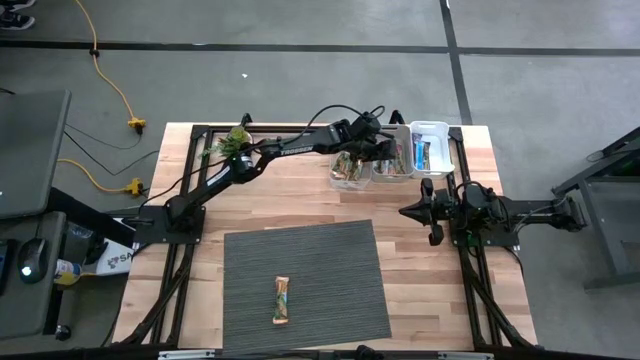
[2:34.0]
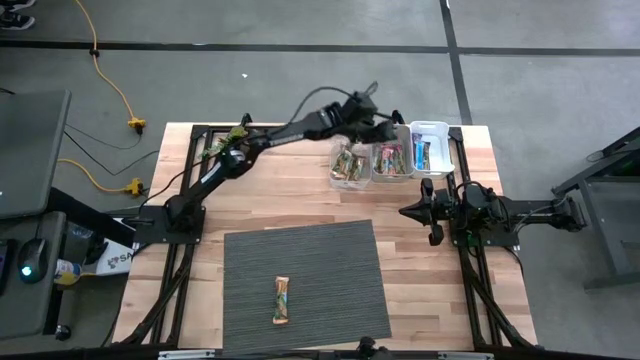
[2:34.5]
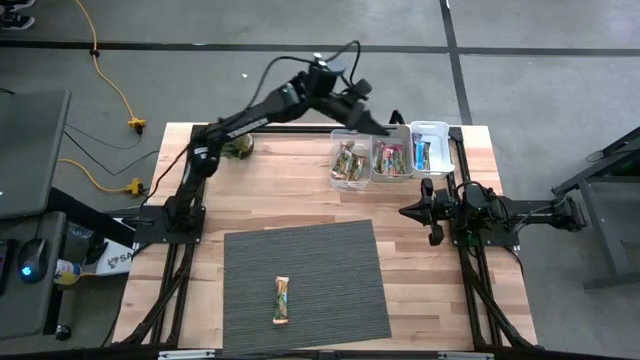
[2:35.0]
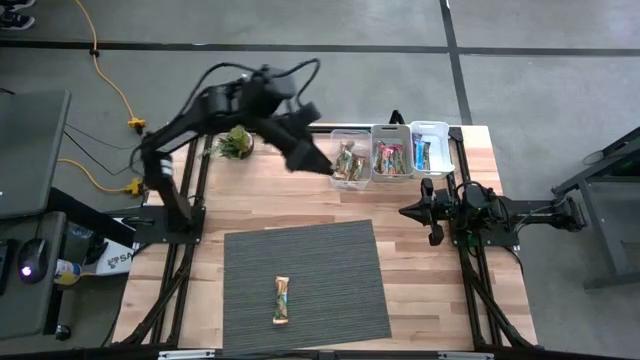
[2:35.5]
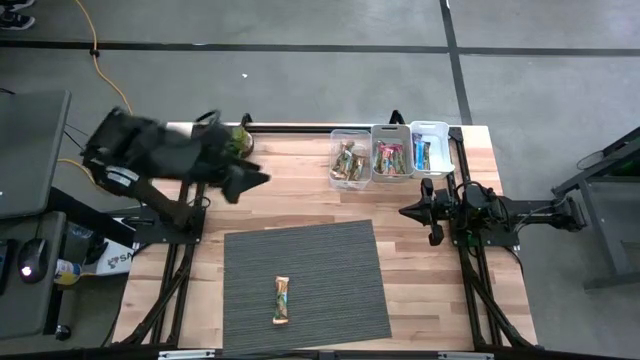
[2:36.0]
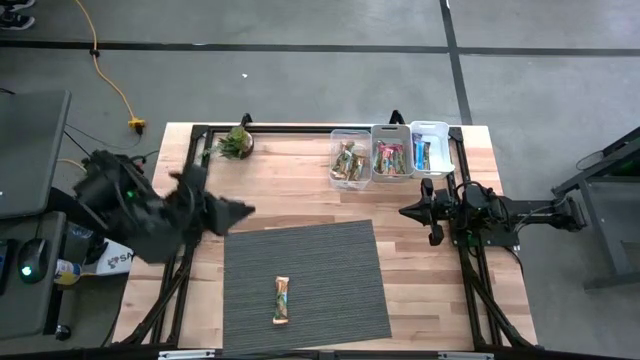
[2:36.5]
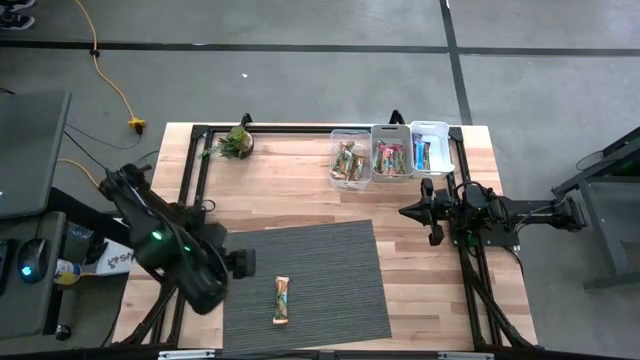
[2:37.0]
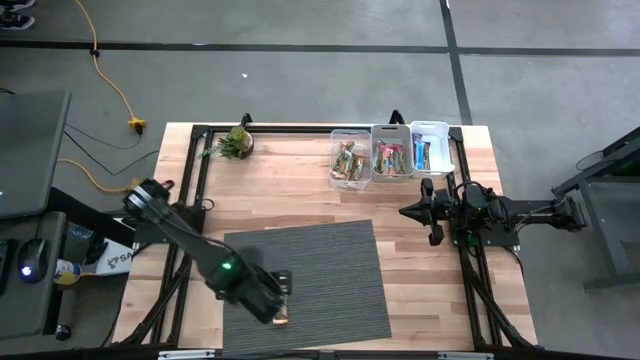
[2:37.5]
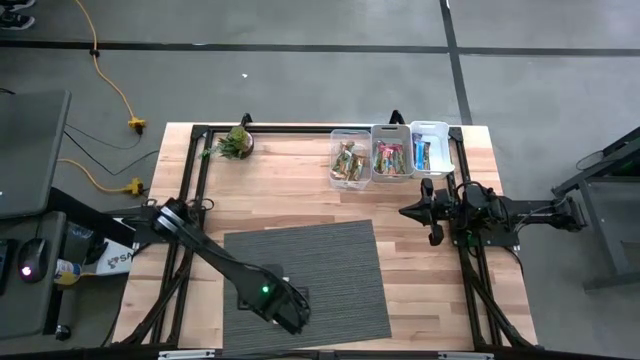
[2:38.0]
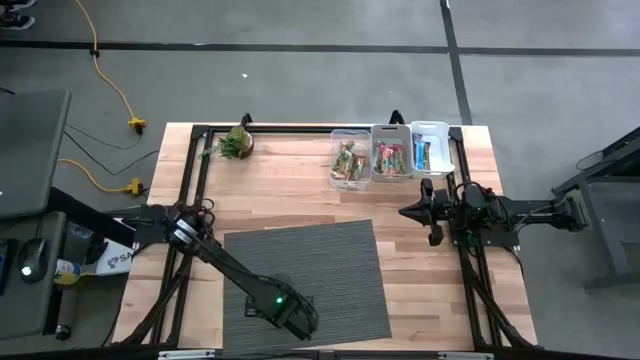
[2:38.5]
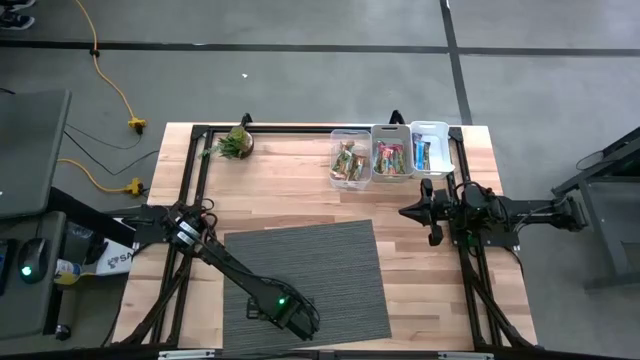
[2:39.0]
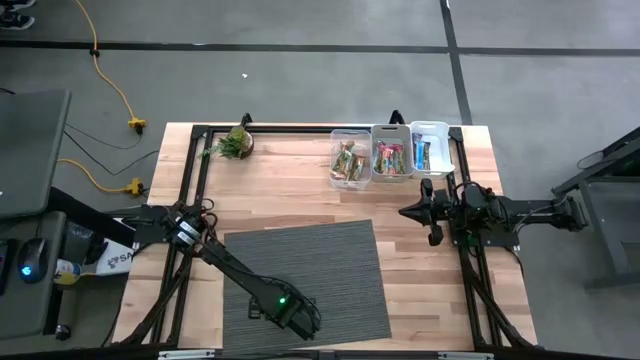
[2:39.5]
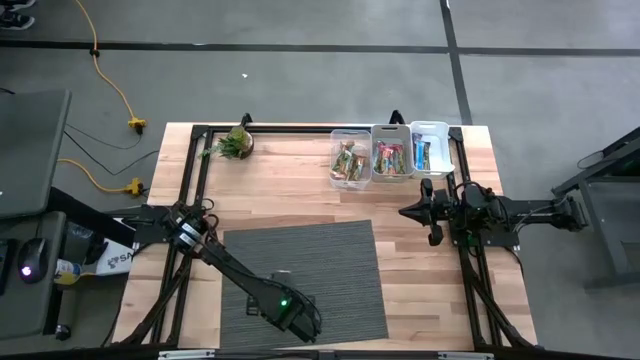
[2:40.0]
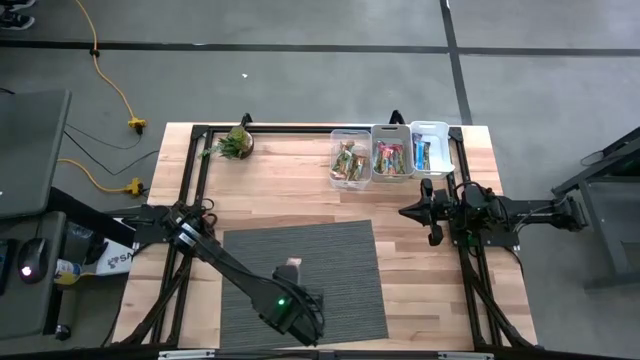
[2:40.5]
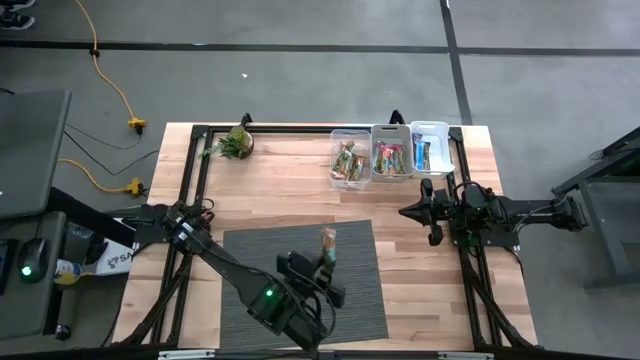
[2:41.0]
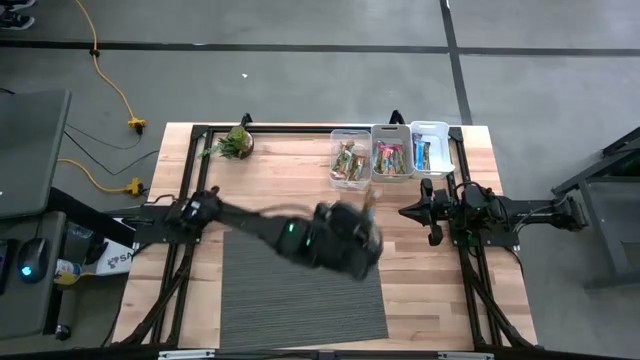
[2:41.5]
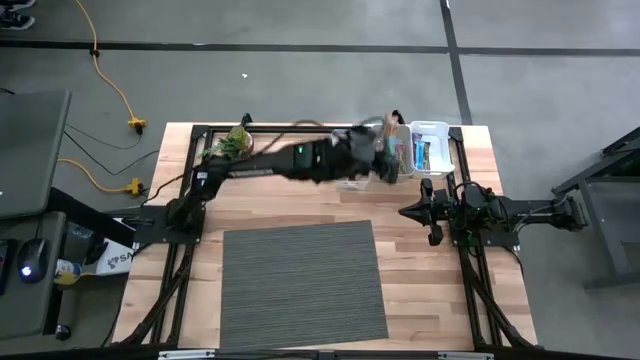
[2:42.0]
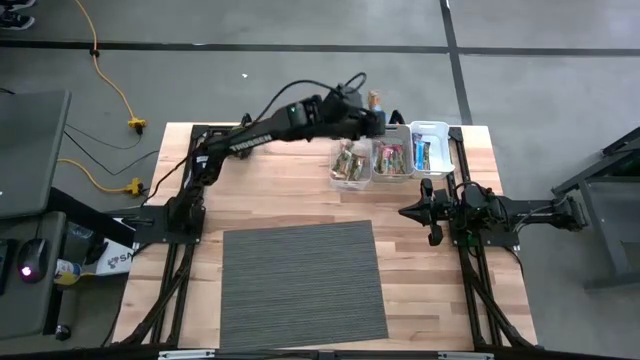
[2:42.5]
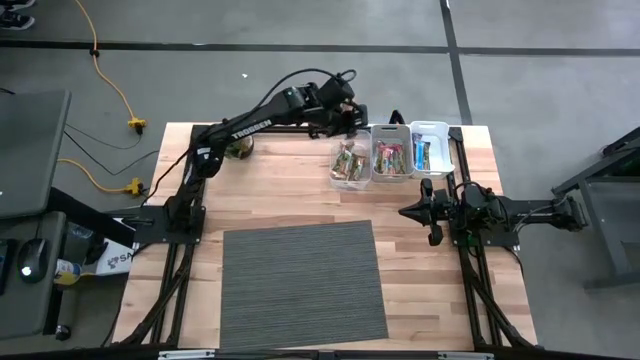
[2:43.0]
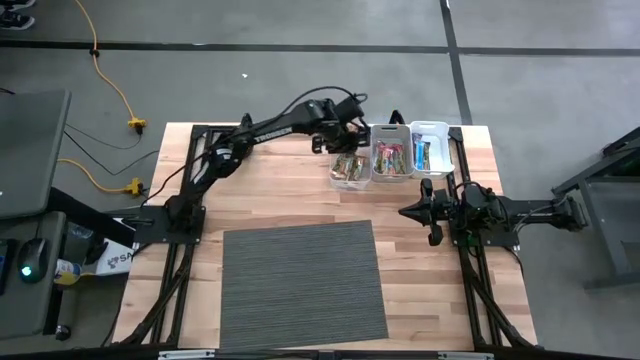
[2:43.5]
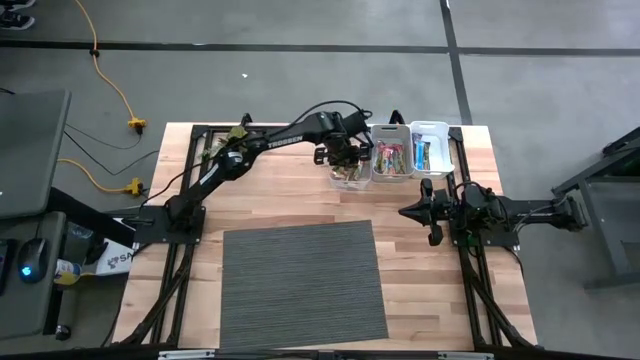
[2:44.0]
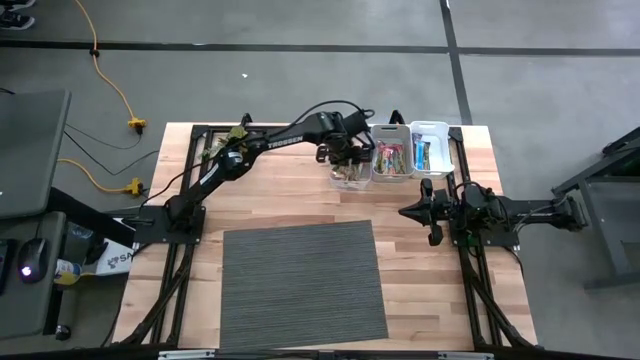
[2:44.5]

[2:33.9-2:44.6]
Task: Pick and place Granola Bars by type
Put the yellow granola bar into the transparent bin

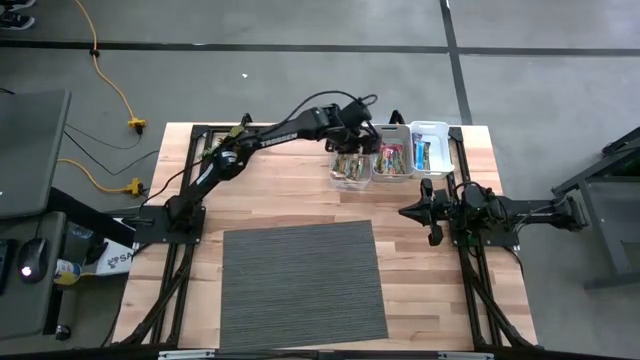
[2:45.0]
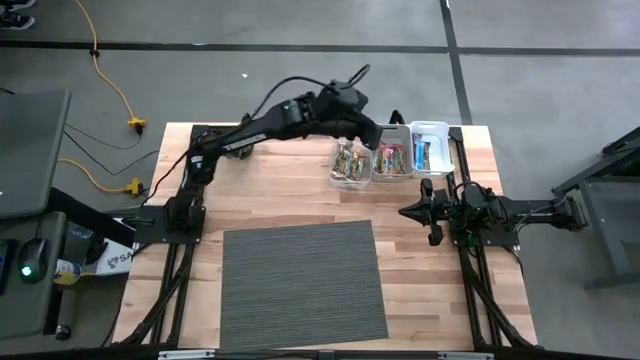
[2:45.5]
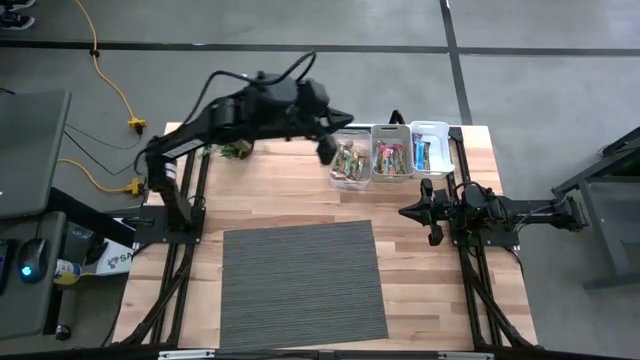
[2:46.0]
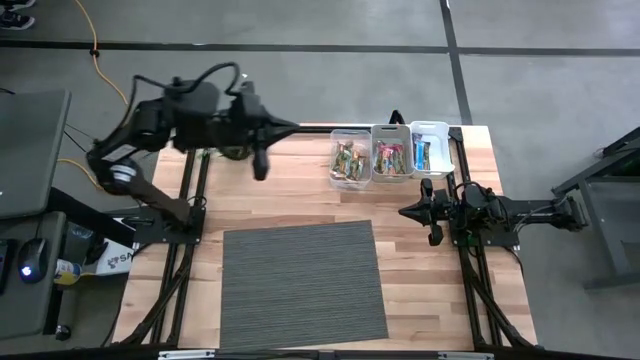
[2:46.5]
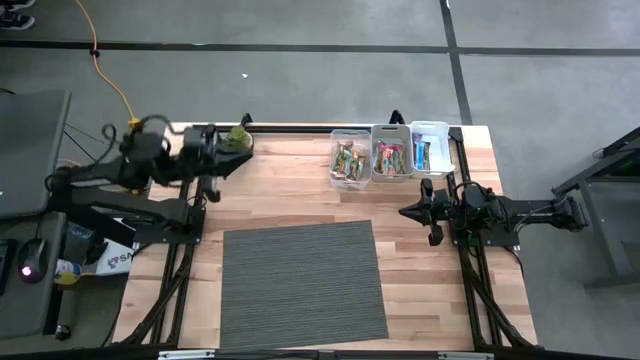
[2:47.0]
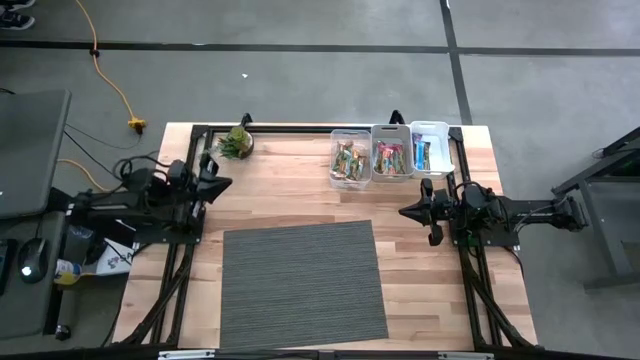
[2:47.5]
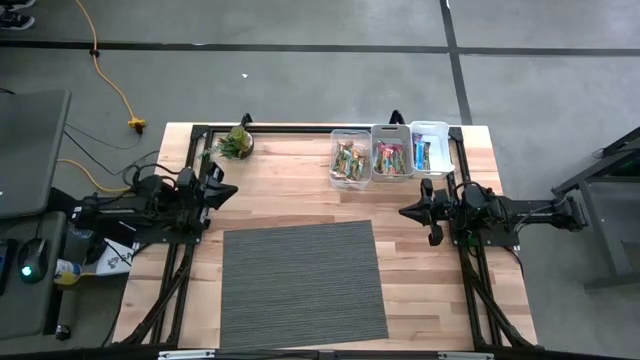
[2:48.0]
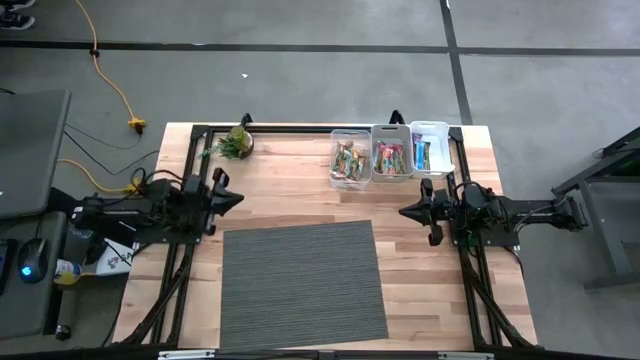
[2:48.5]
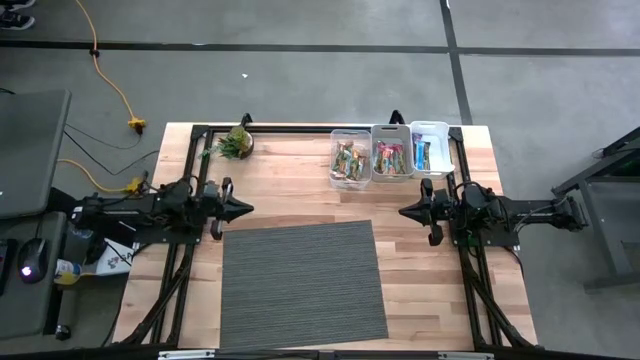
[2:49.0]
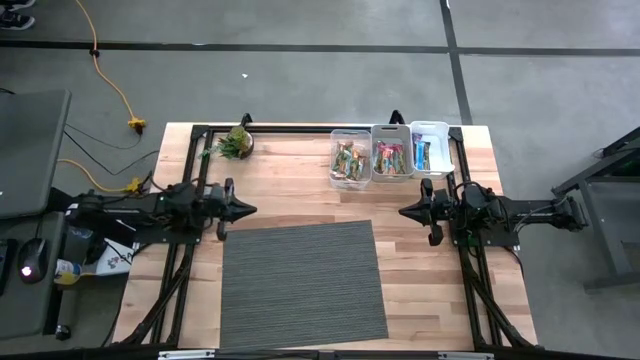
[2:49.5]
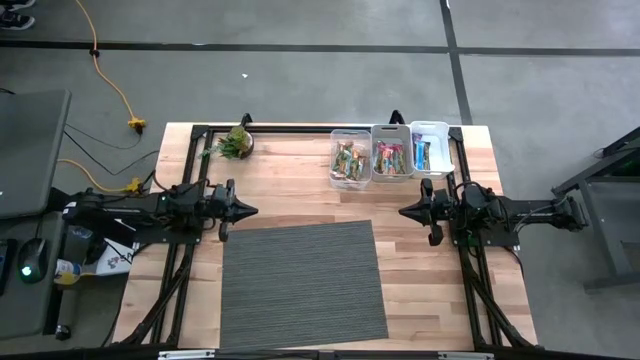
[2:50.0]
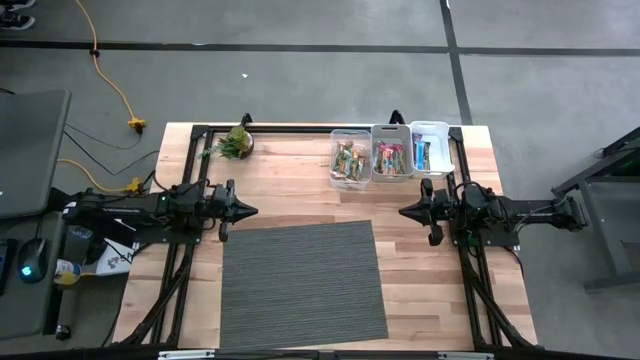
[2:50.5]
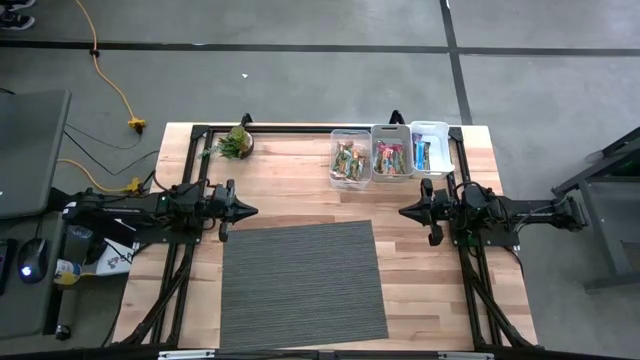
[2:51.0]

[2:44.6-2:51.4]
Return to Home Position
